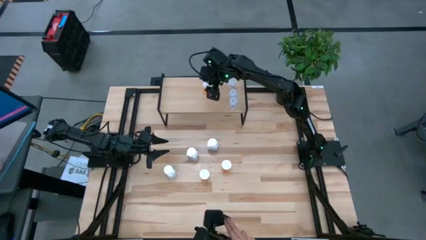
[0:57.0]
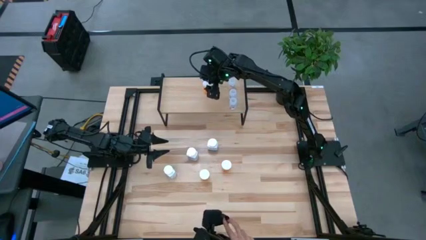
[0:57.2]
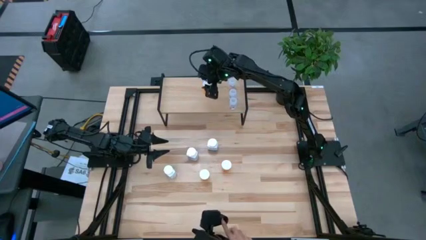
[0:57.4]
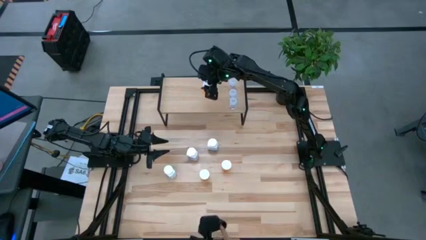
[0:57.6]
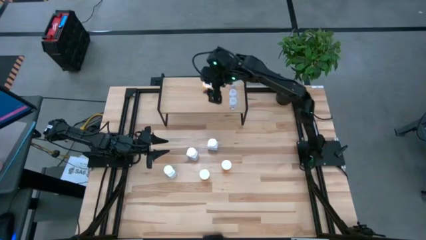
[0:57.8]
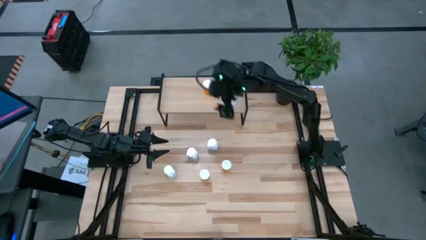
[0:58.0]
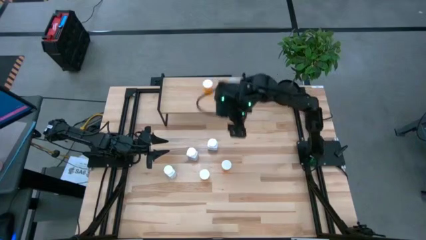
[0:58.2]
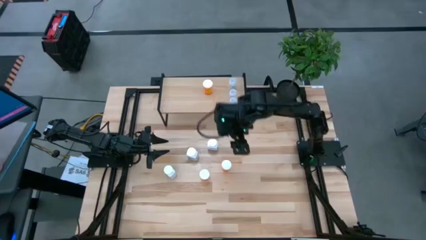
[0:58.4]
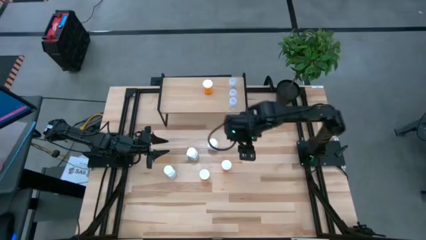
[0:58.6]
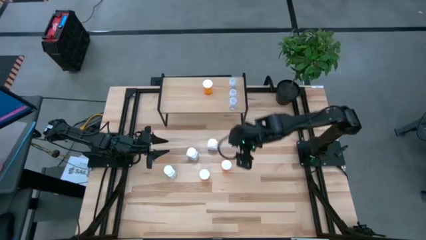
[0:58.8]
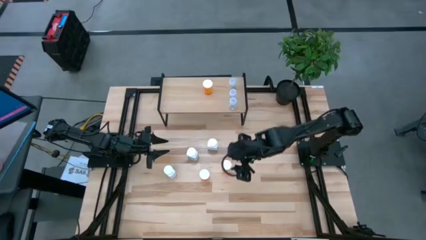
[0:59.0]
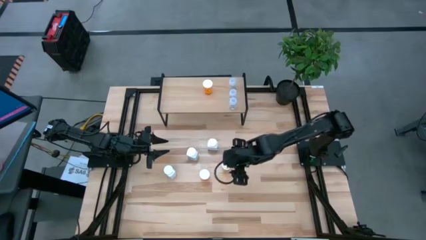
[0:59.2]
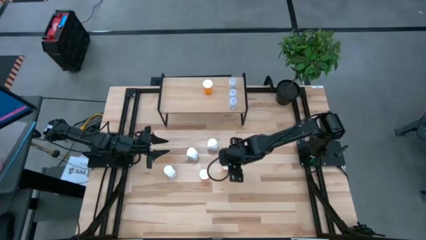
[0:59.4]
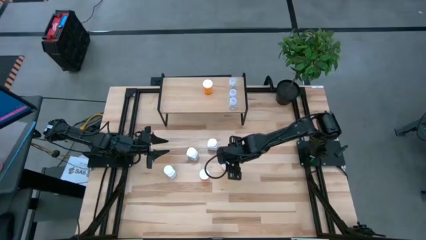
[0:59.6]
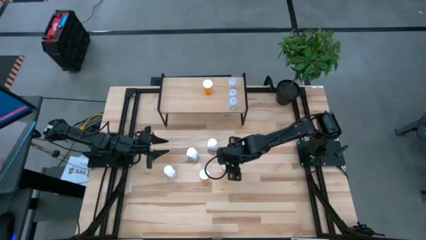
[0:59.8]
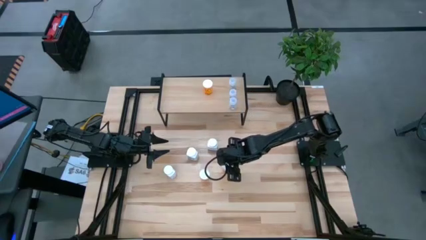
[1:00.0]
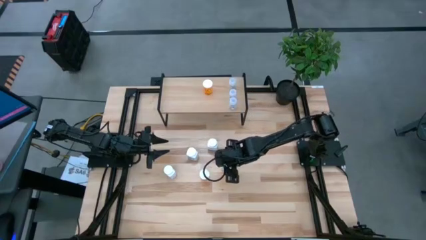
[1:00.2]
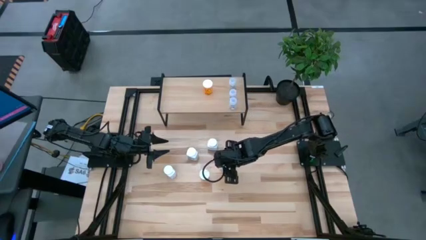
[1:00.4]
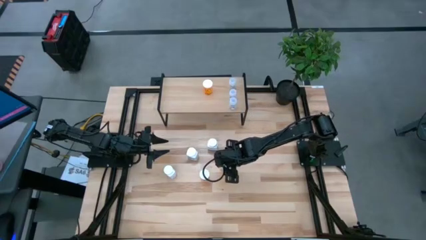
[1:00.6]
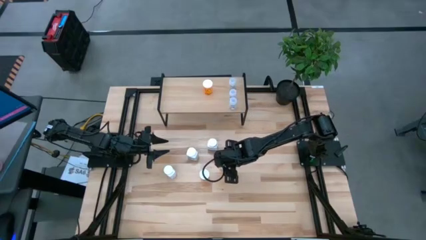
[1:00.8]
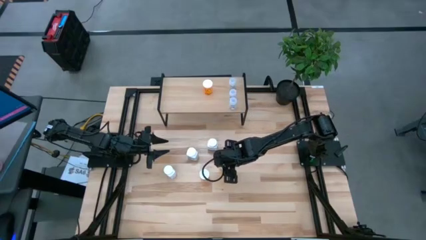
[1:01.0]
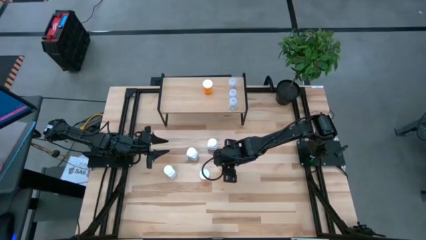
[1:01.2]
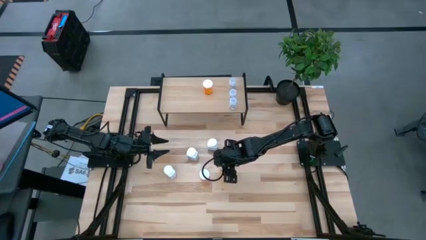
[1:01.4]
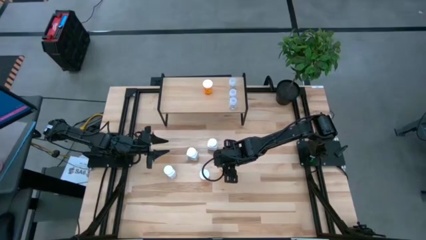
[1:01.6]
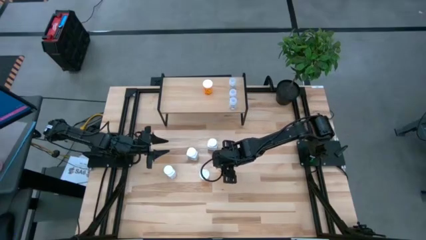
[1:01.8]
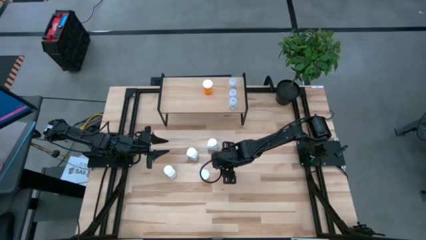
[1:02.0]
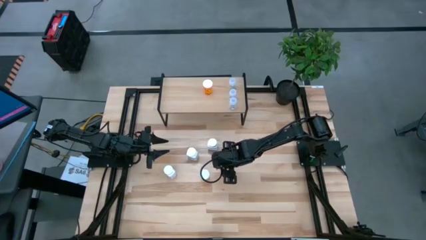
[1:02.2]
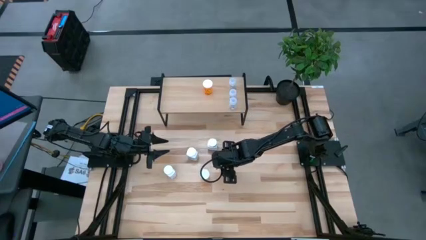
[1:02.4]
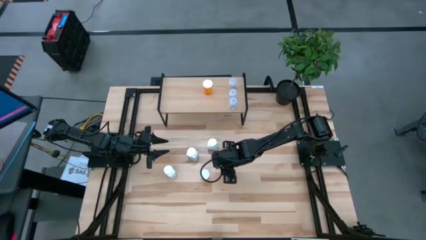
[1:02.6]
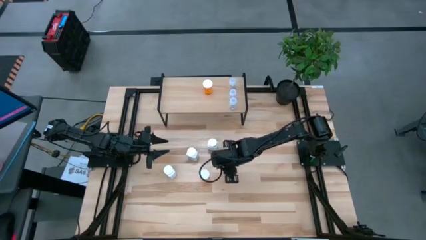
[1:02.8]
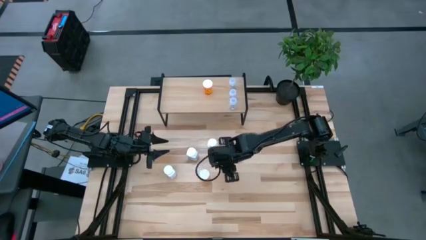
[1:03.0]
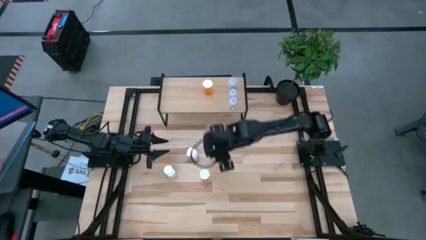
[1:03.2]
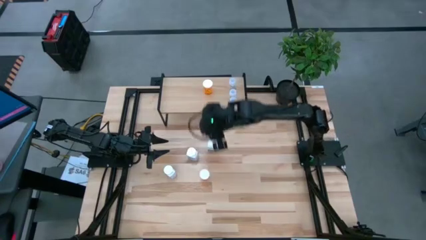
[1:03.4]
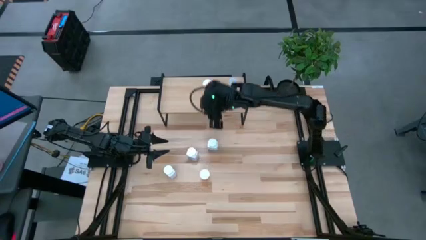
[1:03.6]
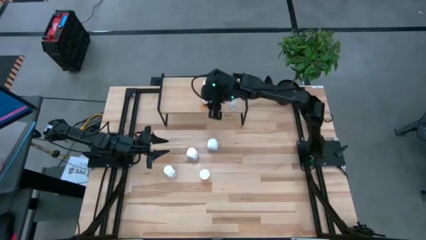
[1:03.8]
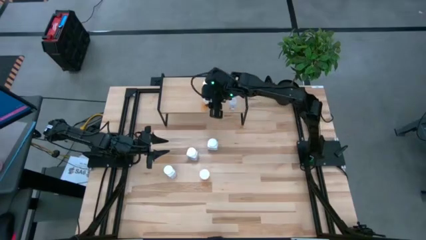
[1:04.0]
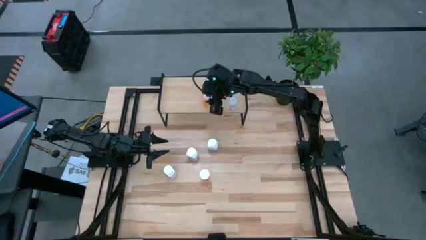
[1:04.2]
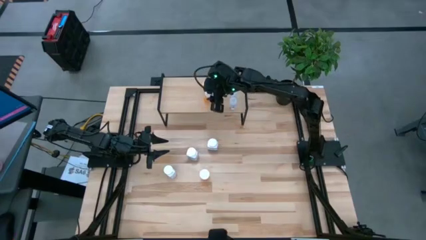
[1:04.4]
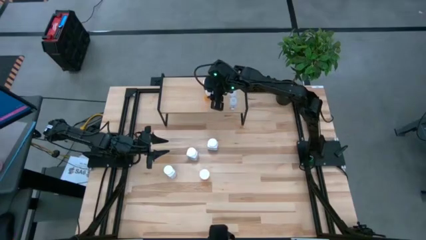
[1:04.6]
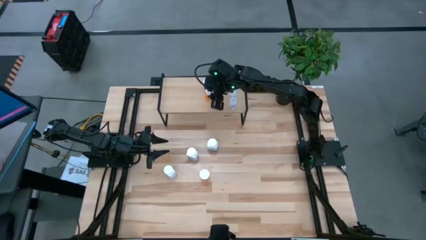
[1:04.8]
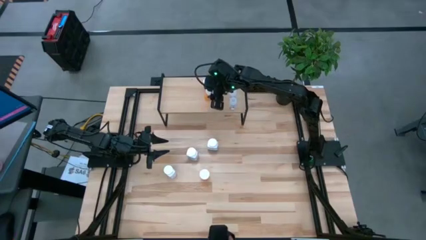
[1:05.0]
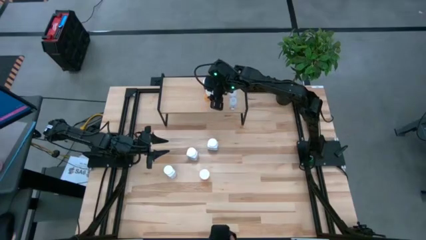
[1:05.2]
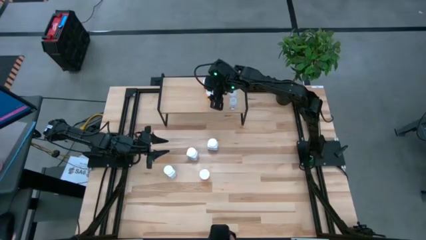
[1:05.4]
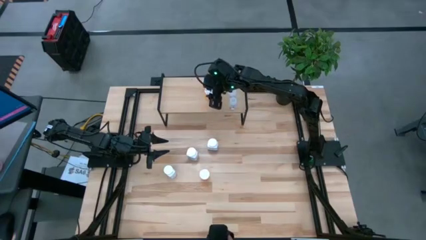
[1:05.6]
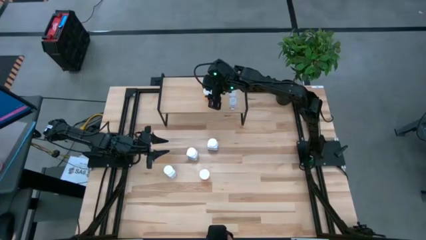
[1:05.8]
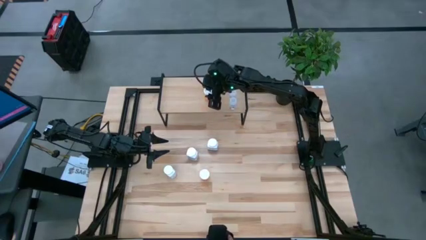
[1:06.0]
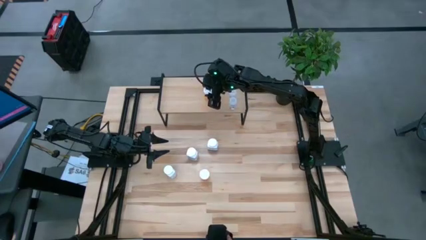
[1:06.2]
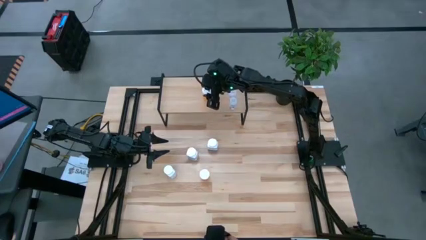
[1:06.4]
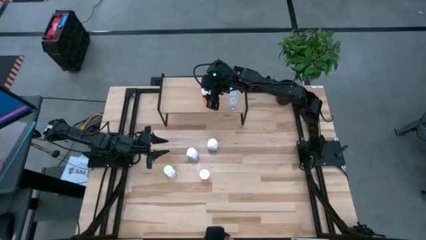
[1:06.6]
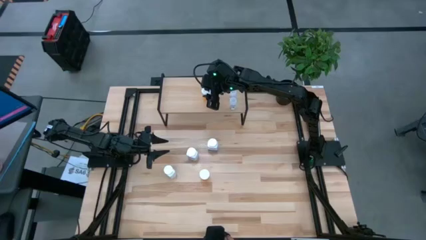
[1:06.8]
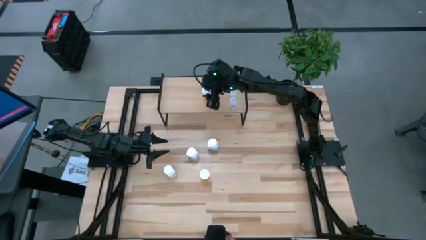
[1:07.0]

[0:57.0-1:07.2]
Task: Pick and place medicine bottles onto shelf by color
Put the right orange pill bottle aligned with the other orange pill bottle on the shelf

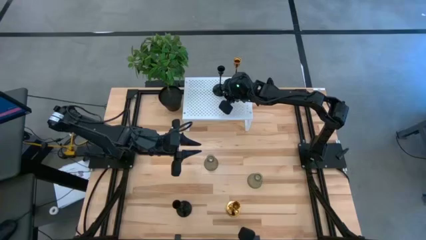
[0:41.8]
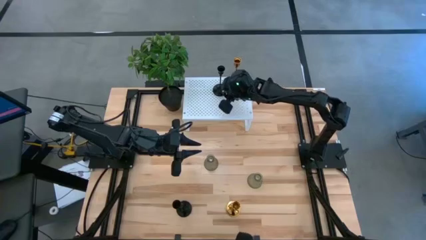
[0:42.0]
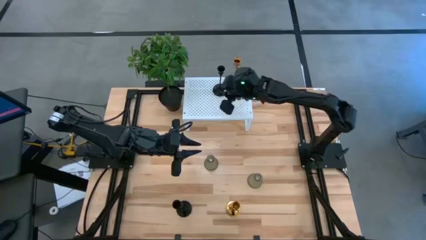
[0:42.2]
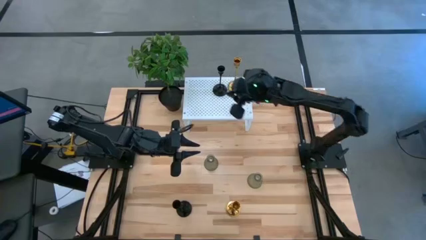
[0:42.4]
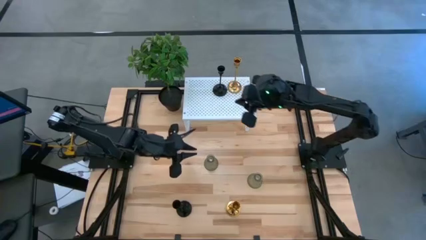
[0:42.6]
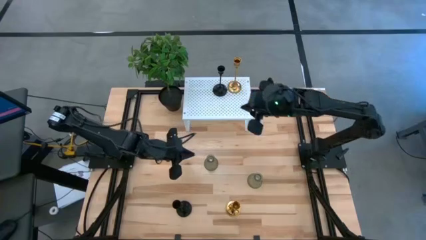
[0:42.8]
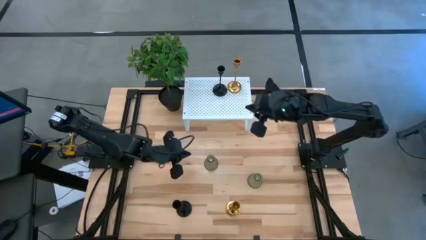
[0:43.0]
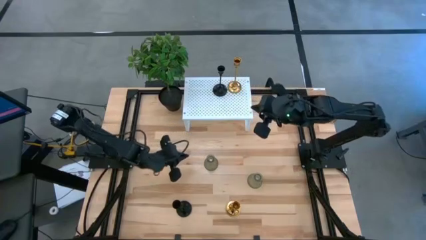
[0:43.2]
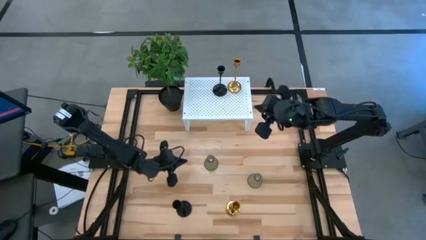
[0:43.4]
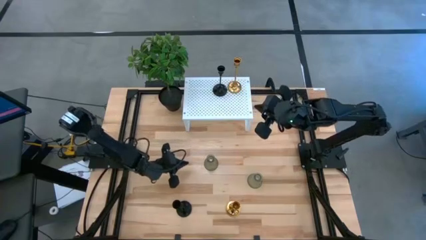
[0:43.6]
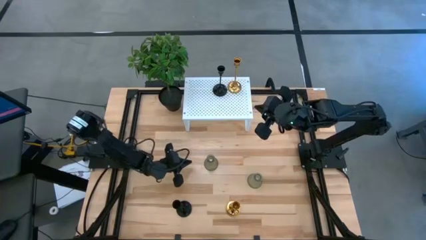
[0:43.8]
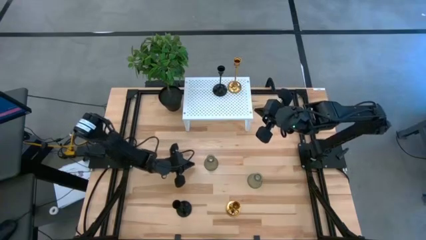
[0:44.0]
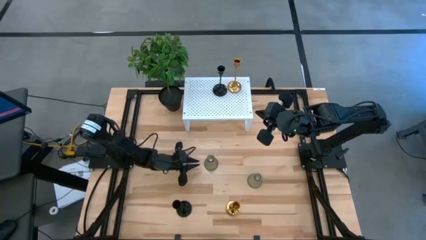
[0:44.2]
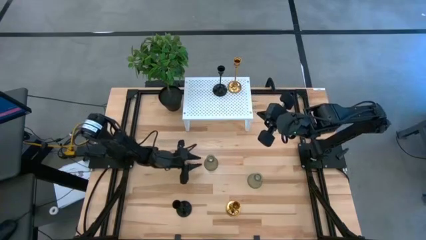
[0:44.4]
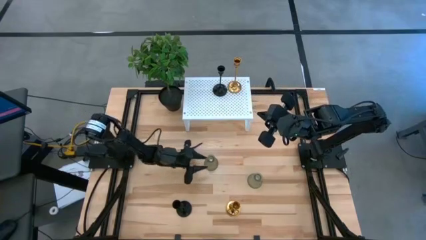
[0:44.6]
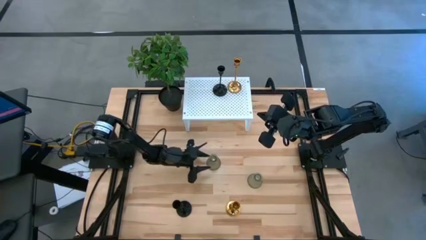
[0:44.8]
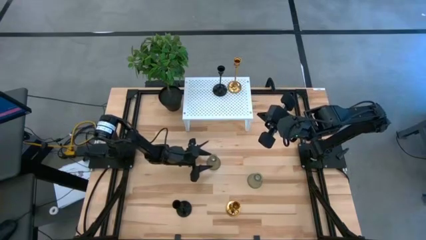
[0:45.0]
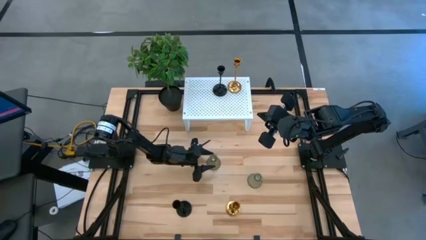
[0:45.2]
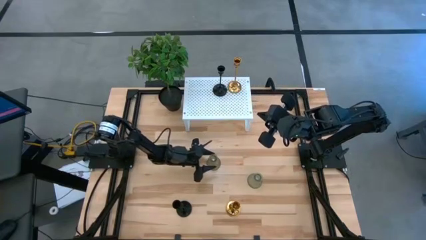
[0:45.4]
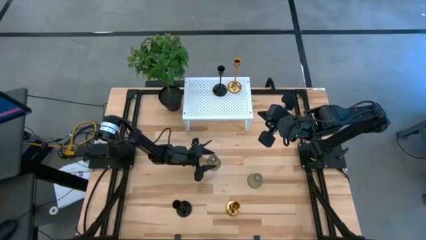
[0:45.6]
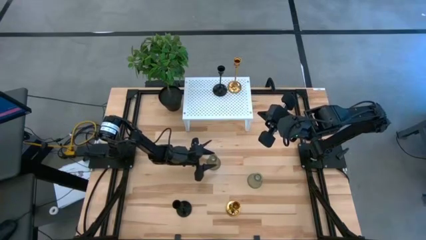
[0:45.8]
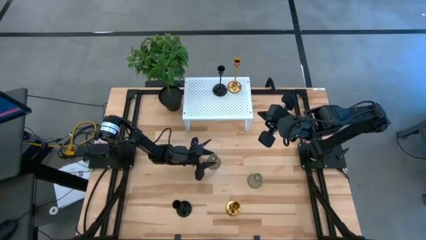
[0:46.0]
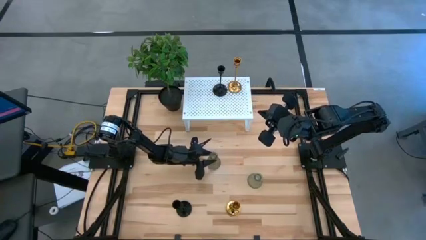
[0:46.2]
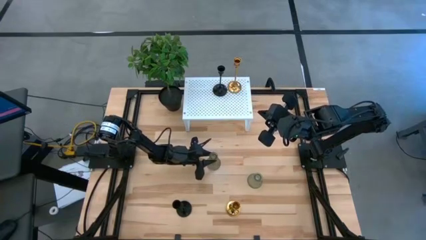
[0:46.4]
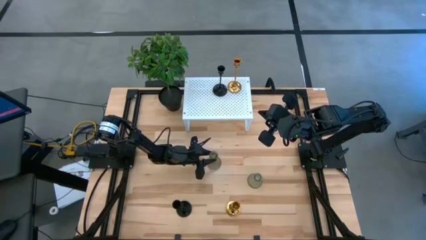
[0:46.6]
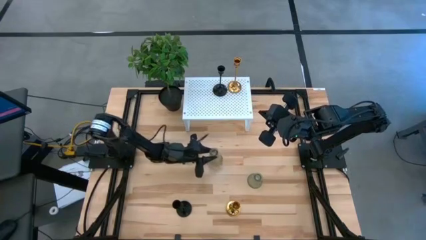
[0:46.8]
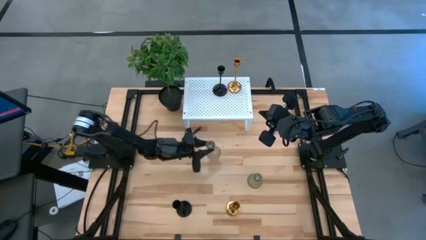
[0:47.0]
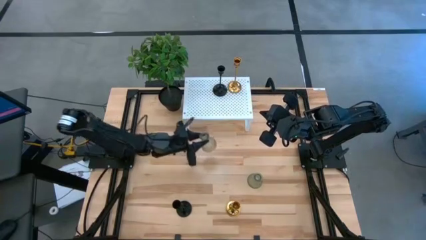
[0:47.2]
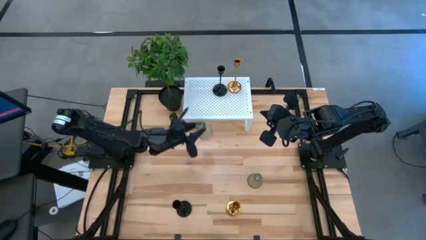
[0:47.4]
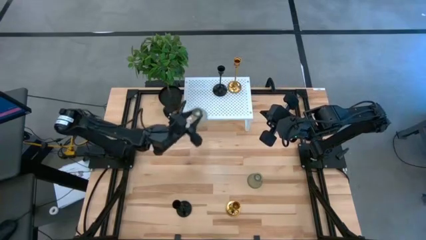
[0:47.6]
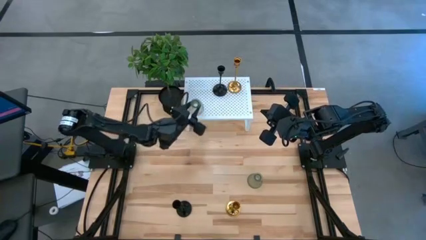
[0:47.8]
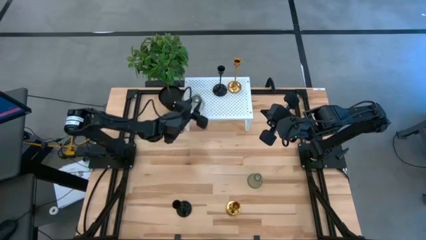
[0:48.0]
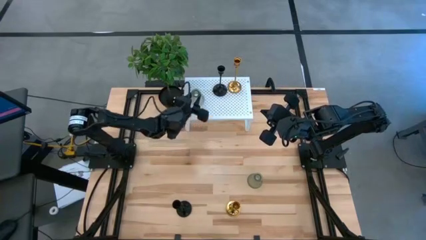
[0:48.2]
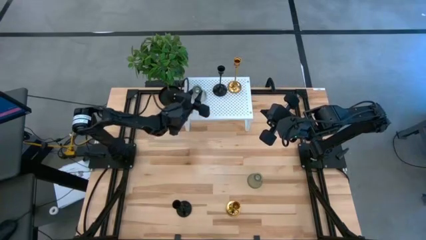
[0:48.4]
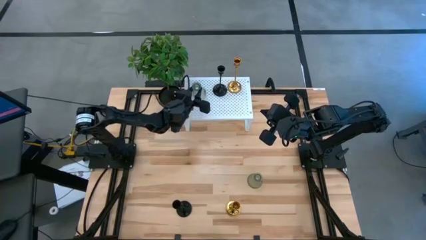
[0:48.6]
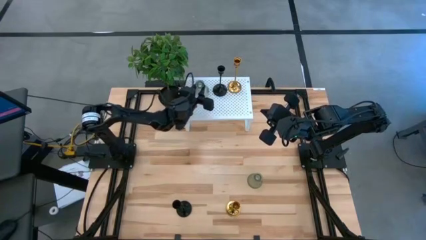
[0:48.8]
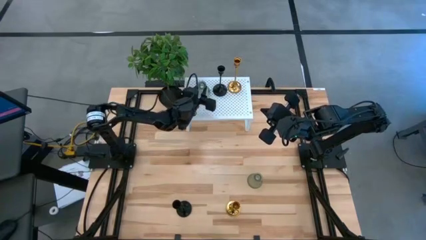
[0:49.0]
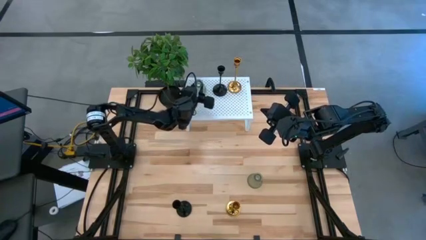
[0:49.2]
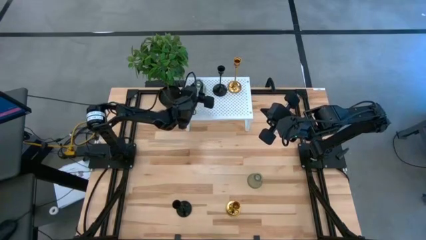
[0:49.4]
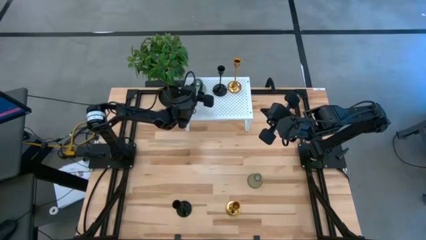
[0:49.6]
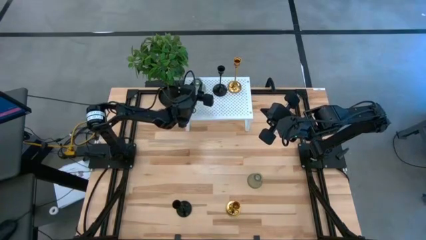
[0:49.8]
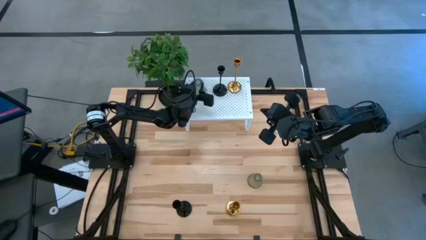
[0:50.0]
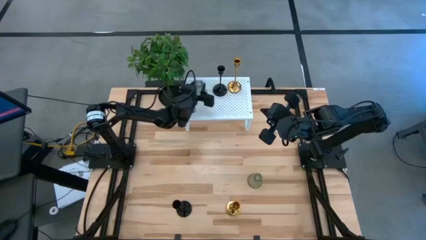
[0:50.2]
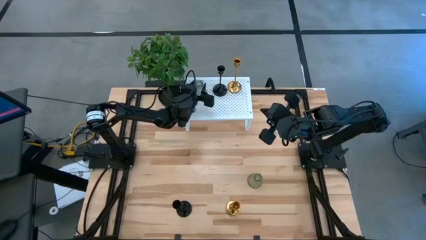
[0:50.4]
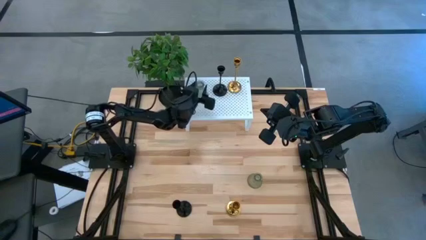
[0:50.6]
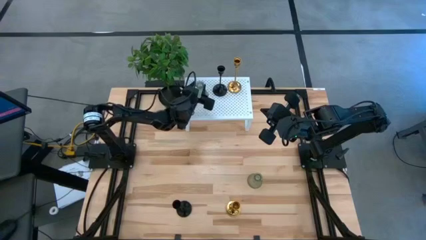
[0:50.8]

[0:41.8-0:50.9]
Task: Pick & Place candle stick holders
Put the top green glass candle holder on the shelf
